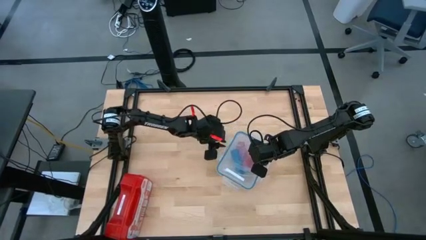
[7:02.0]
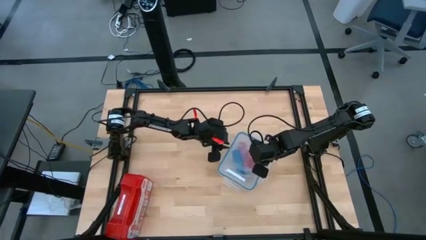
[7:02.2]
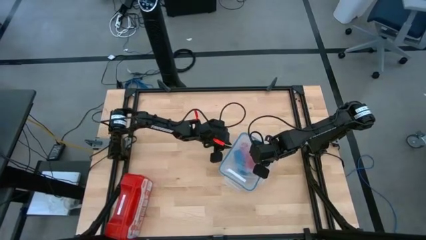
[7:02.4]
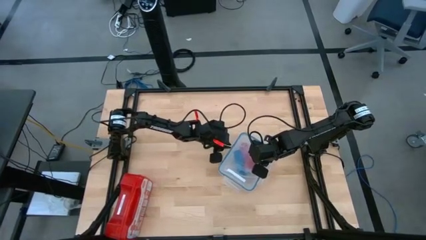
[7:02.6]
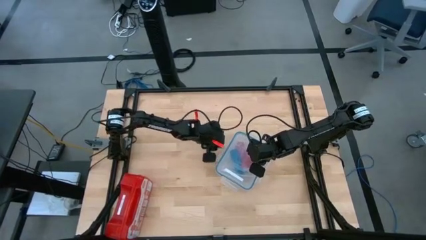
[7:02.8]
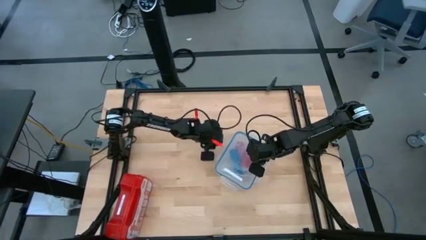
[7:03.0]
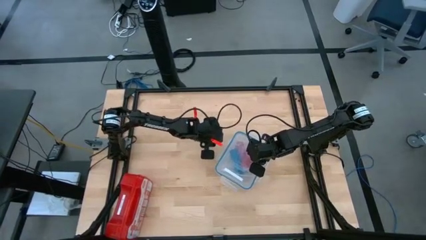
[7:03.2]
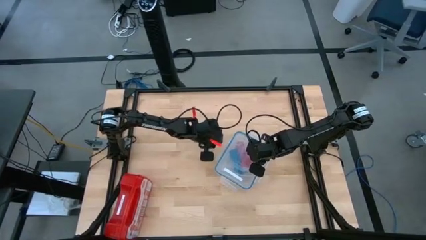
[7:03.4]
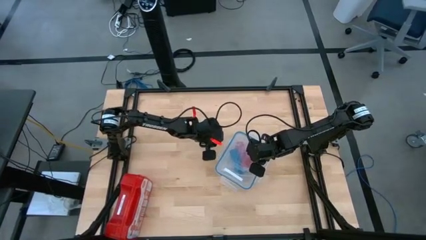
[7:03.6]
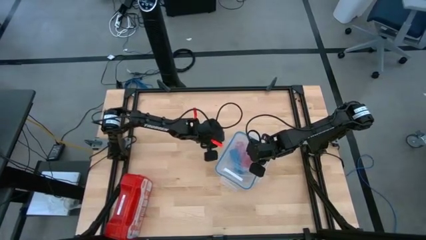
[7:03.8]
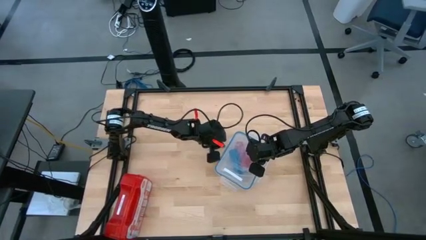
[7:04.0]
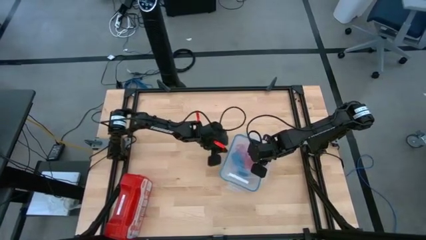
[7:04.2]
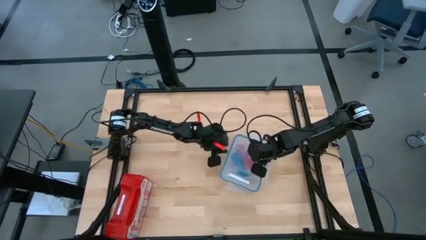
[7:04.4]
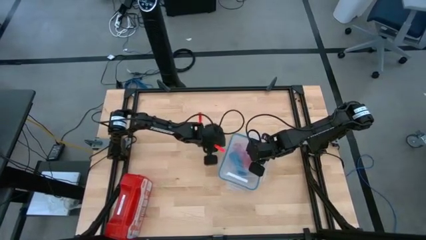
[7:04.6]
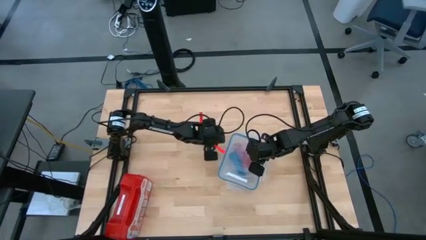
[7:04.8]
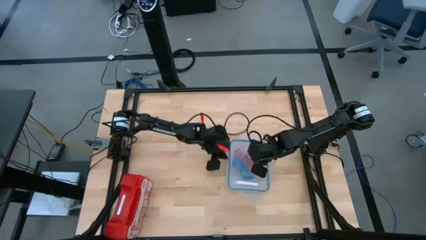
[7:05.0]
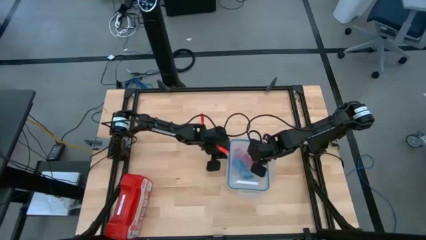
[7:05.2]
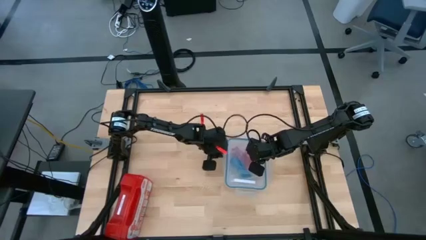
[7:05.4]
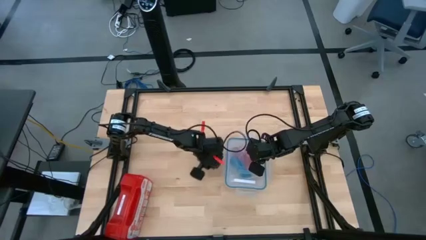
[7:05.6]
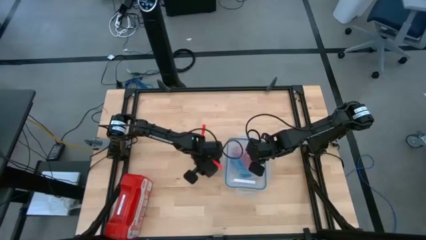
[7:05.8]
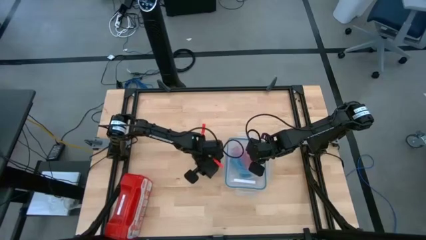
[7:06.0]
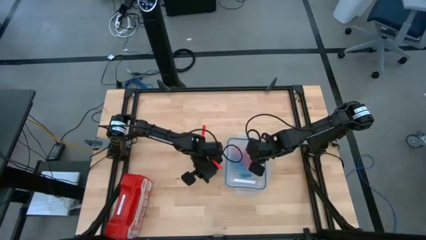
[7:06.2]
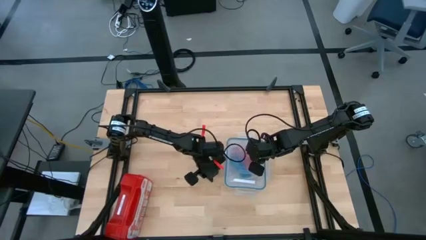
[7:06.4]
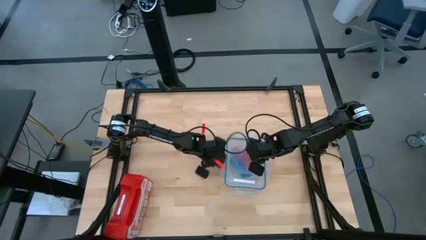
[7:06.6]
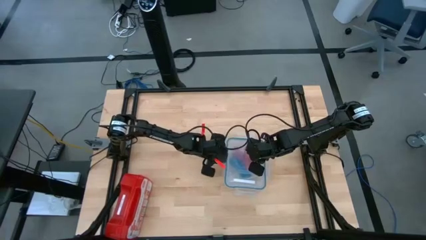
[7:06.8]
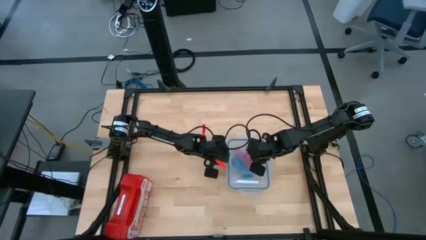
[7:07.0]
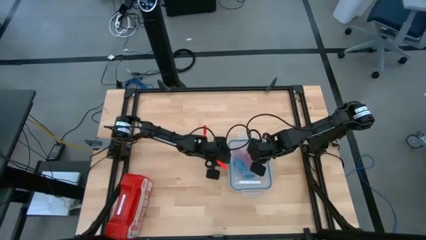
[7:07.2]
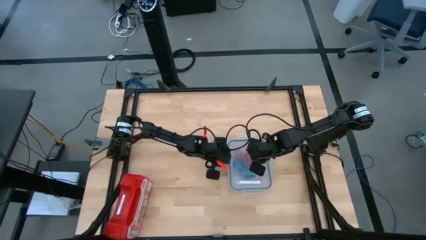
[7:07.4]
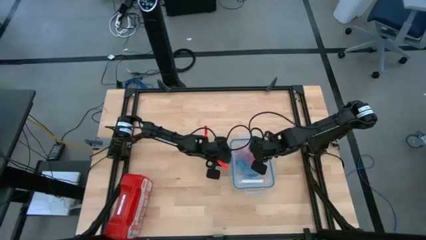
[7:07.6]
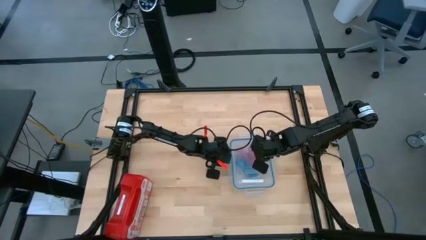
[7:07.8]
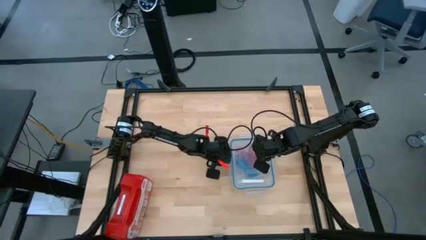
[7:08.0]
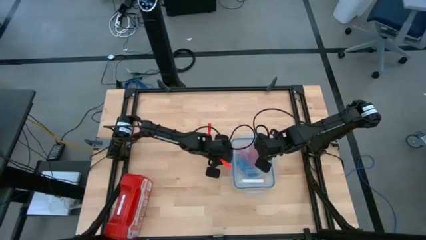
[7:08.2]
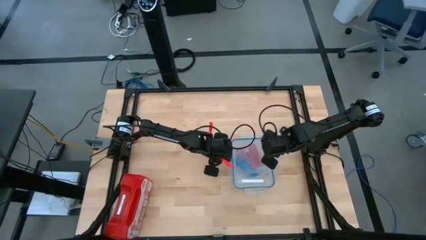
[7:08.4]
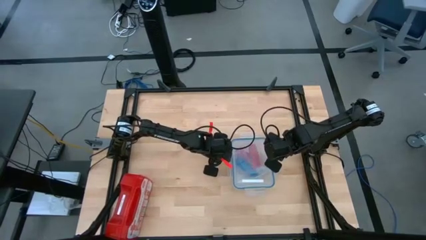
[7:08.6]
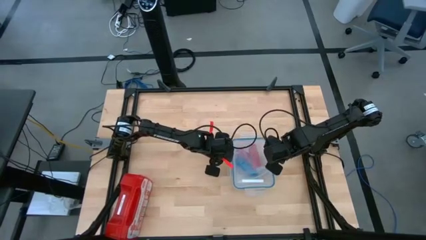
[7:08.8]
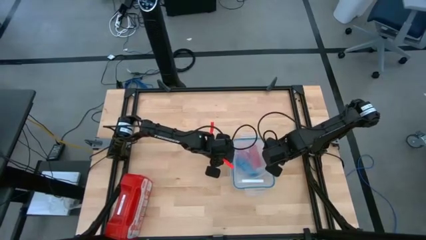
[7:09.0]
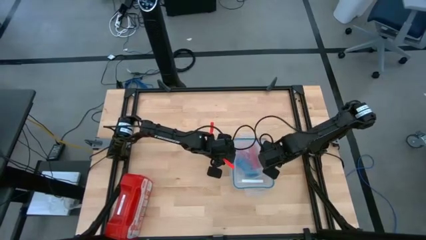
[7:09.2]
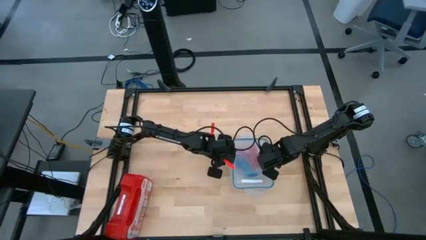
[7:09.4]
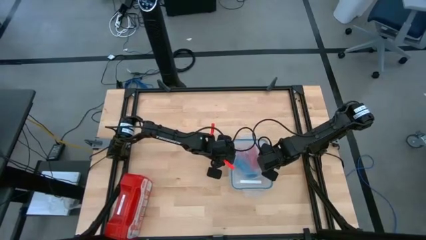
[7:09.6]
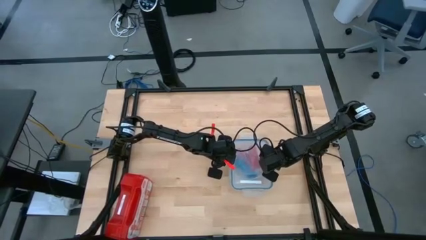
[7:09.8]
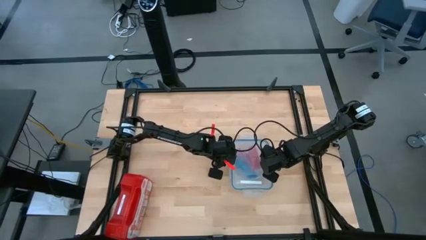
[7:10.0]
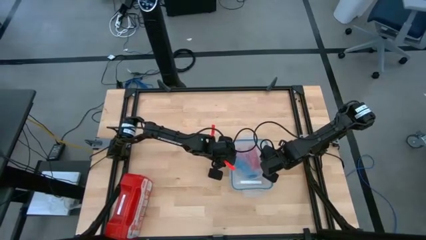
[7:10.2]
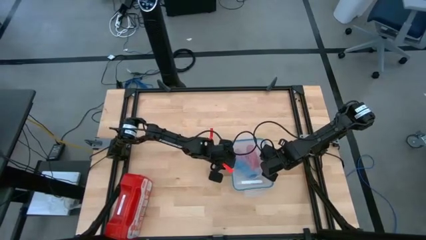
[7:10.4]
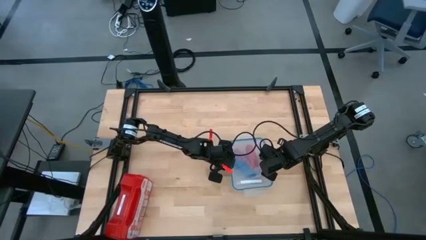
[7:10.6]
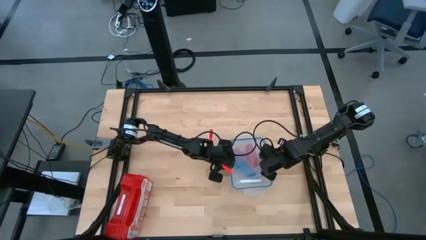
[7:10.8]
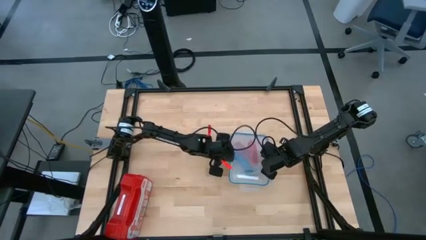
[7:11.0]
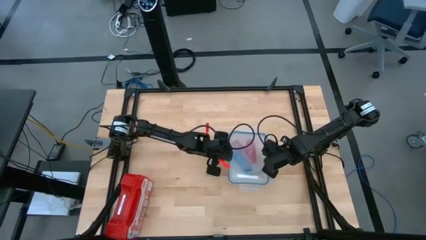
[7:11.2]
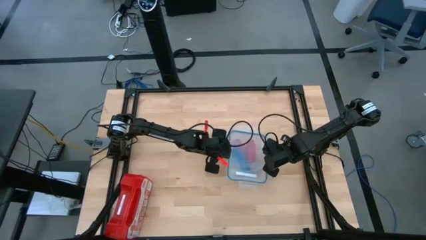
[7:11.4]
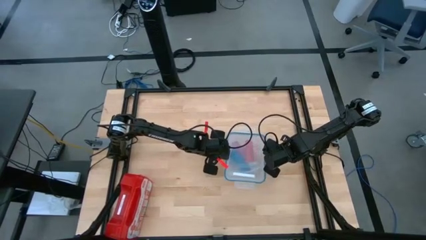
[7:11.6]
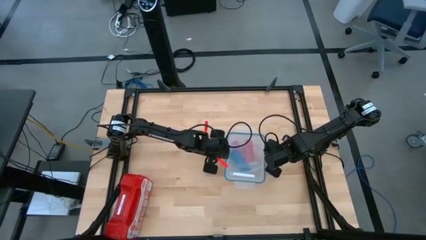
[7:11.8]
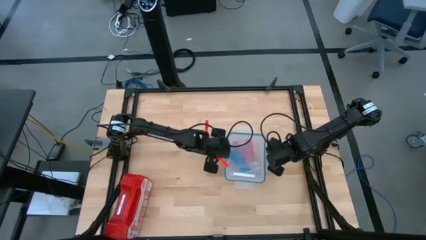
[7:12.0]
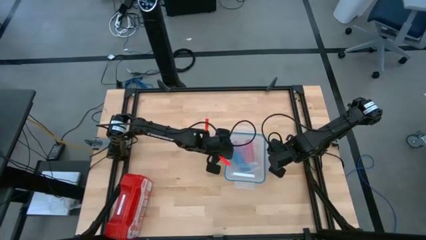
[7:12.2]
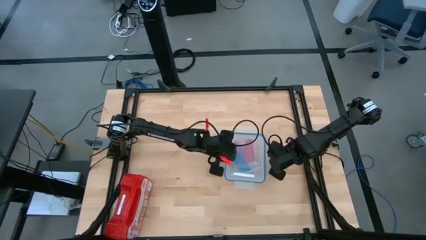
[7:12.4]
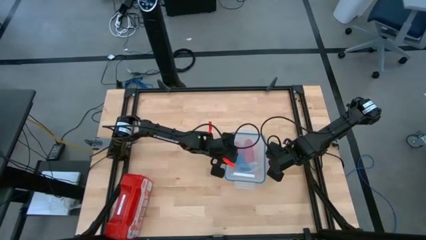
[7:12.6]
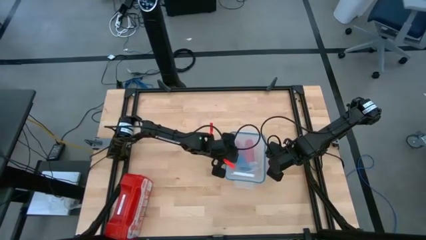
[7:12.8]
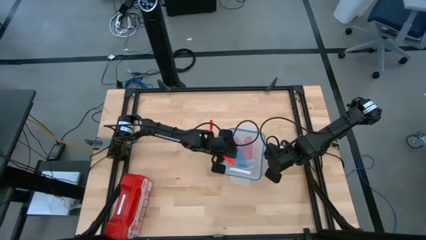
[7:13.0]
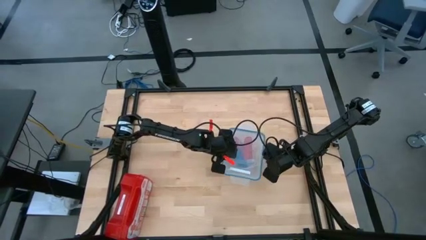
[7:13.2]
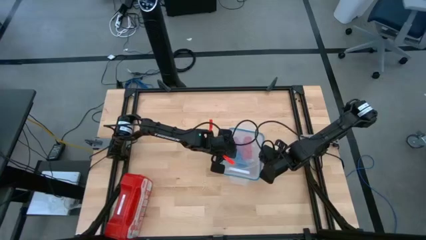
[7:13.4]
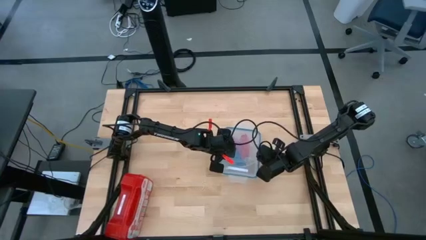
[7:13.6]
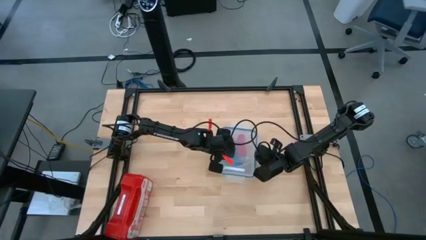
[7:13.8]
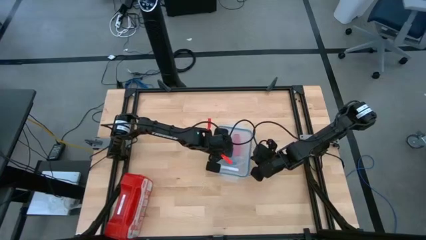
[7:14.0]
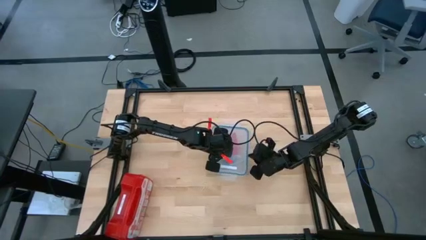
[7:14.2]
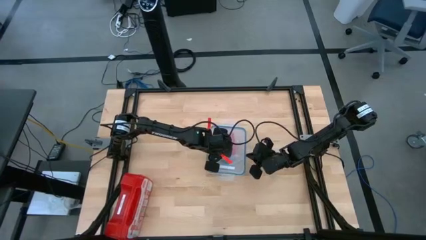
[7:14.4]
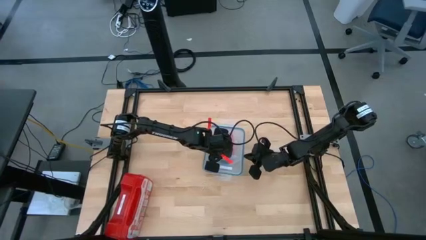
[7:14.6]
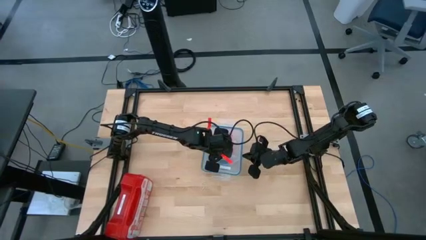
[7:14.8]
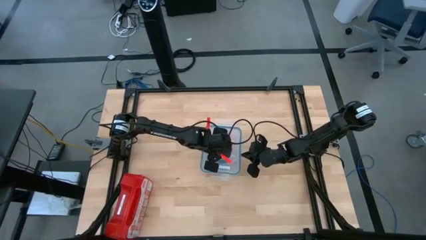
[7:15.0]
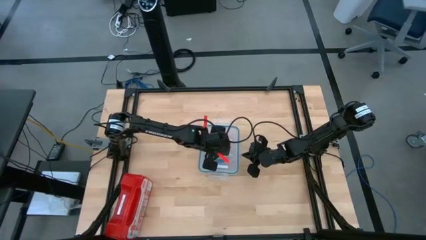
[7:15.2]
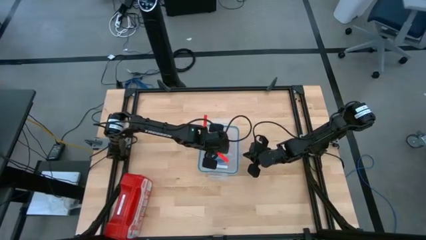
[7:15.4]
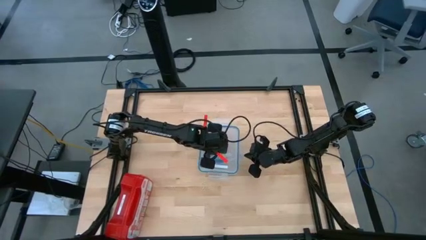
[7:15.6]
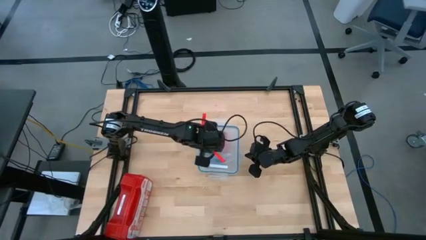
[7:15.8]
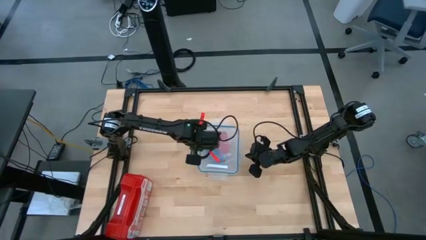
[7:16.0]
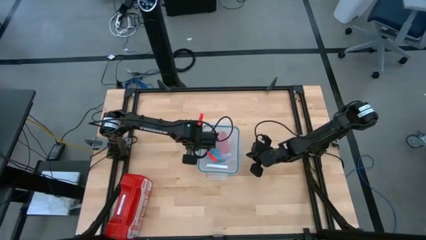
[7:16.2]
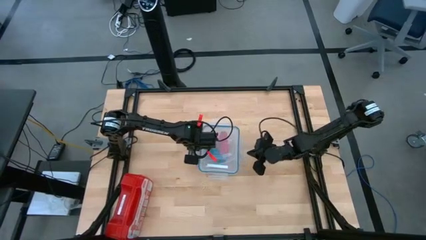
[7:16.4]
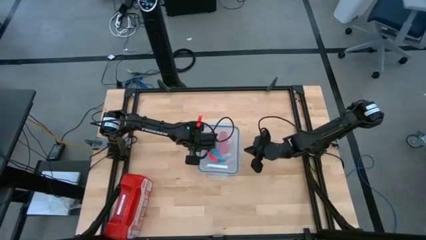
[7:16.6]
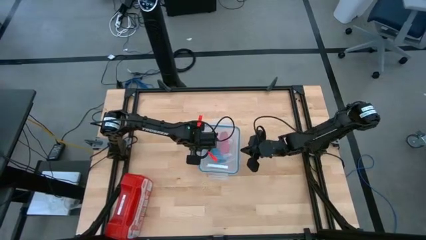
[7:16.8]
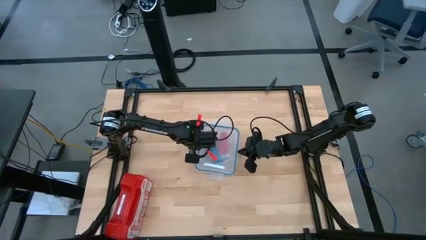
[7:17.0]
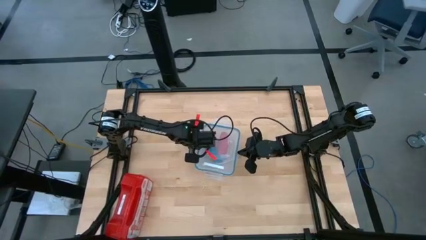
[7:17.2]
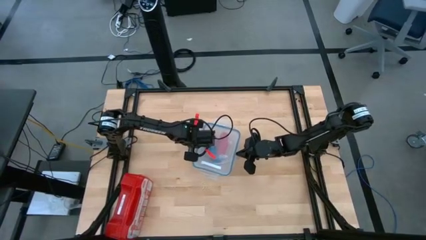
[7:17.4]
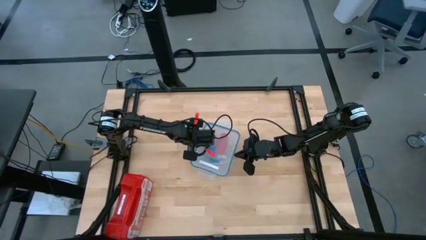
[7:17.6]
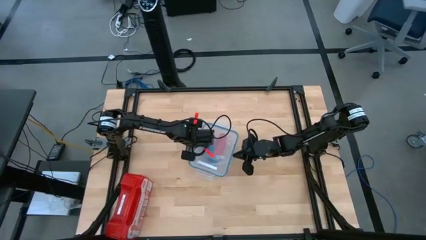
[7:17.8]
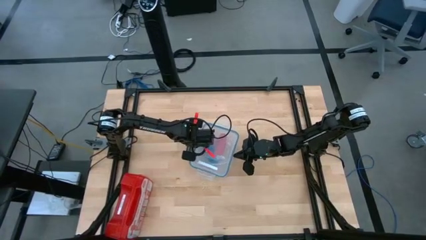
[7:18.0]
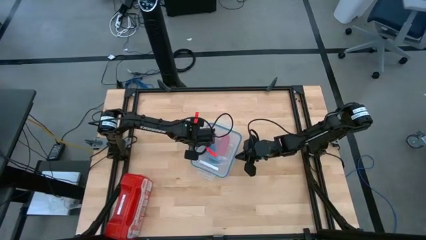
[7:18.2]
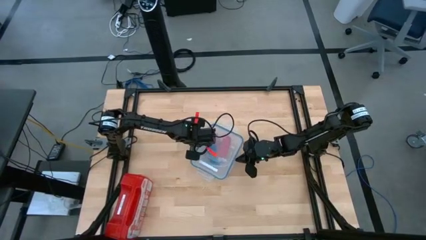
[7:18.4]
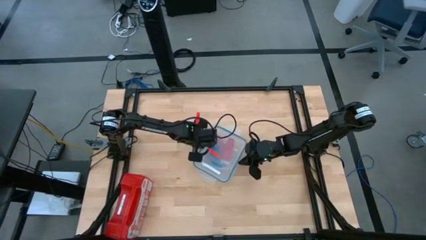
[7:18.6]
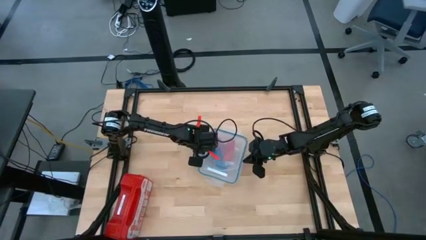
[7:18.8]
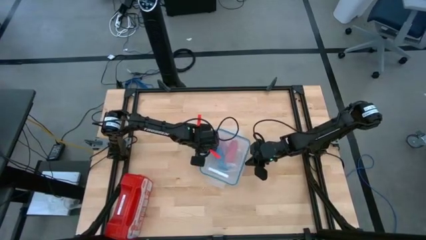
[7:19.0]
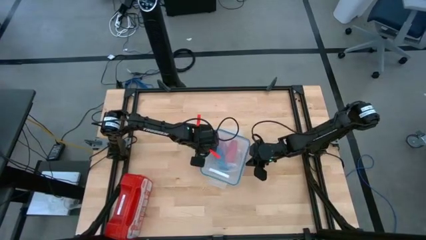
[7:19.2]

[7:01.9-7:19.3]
Task: Roll bandage
Close the transparent container
